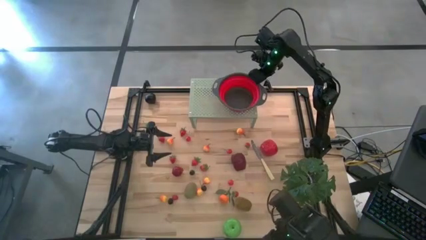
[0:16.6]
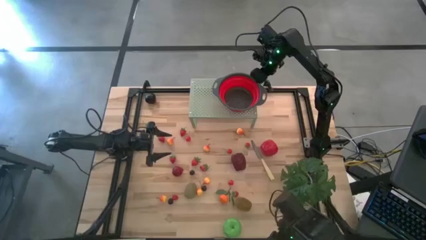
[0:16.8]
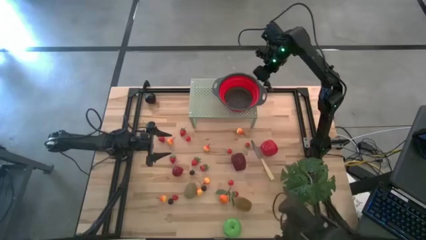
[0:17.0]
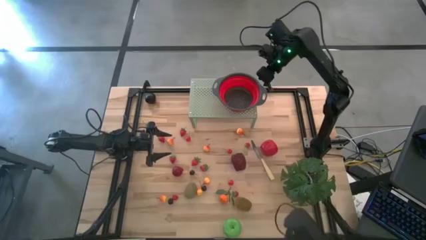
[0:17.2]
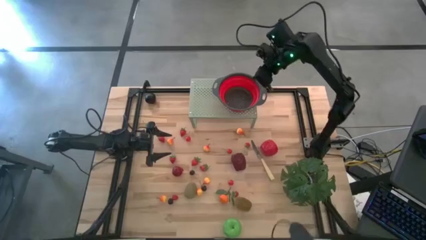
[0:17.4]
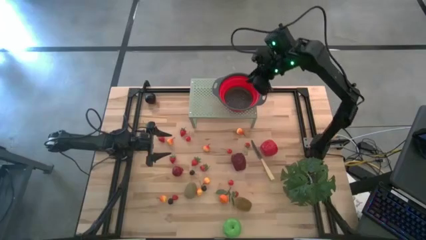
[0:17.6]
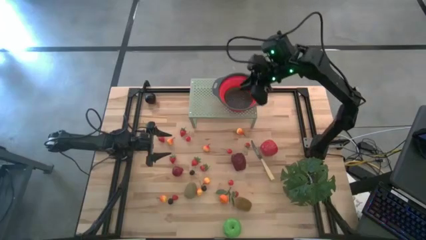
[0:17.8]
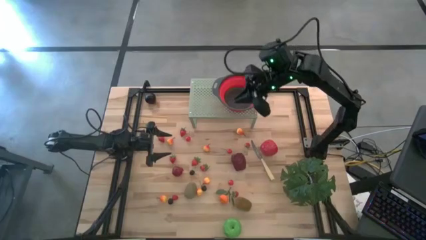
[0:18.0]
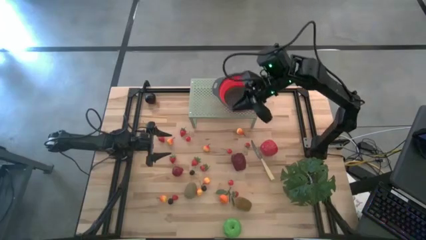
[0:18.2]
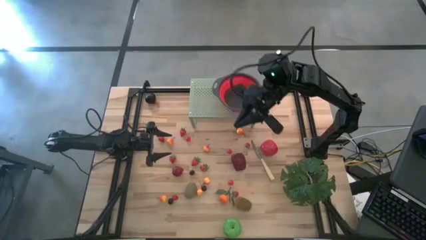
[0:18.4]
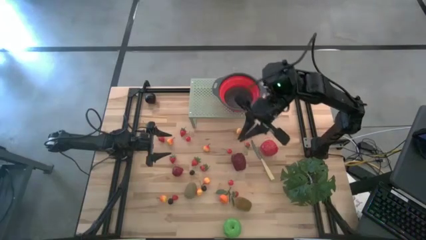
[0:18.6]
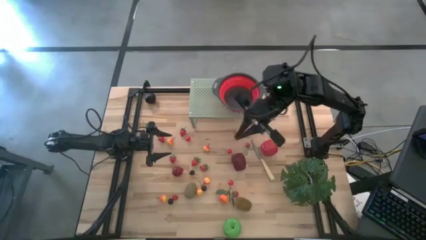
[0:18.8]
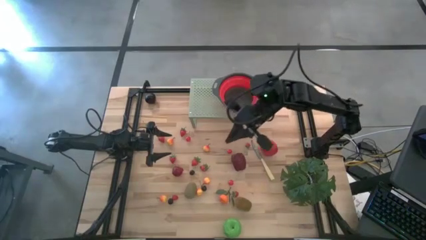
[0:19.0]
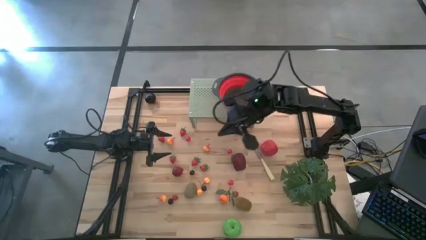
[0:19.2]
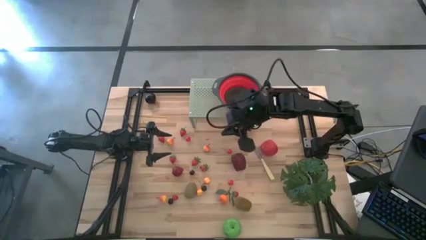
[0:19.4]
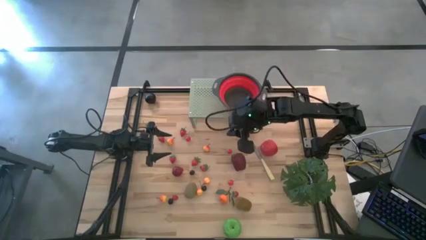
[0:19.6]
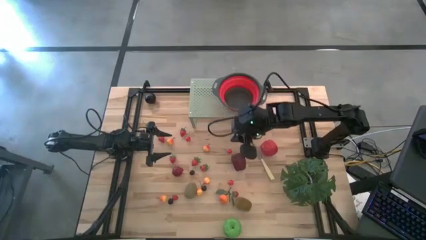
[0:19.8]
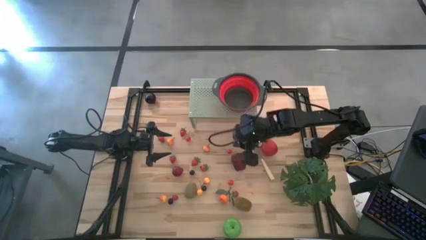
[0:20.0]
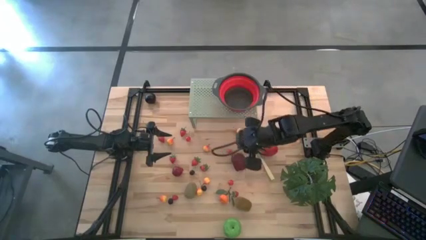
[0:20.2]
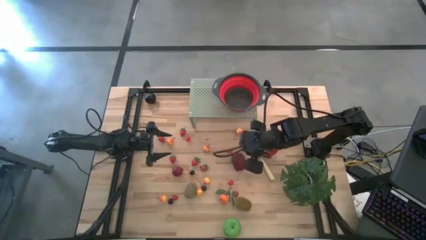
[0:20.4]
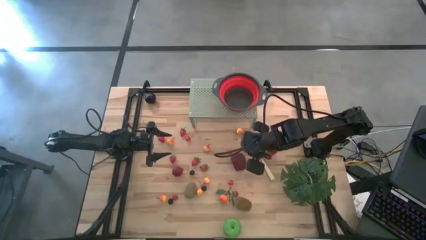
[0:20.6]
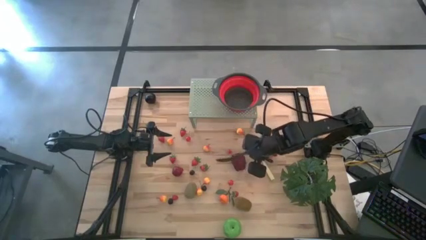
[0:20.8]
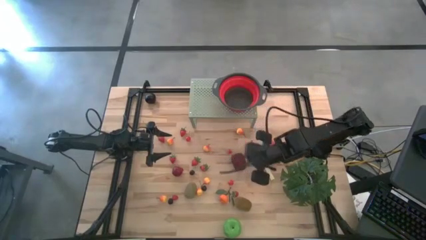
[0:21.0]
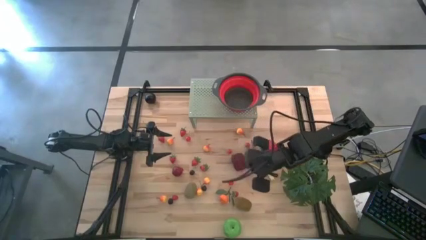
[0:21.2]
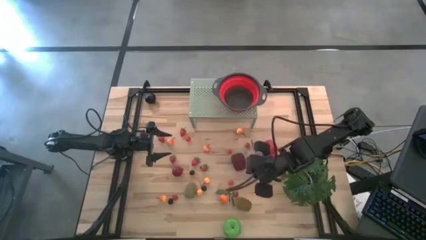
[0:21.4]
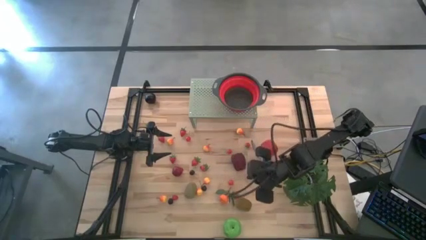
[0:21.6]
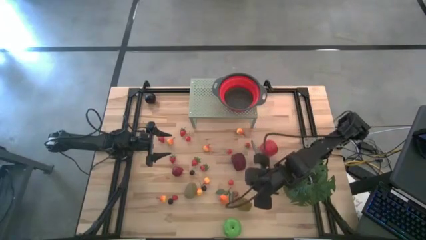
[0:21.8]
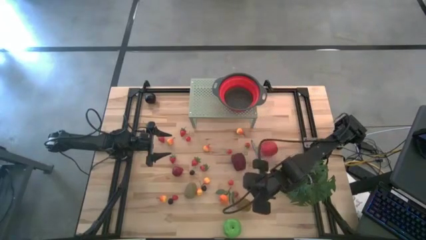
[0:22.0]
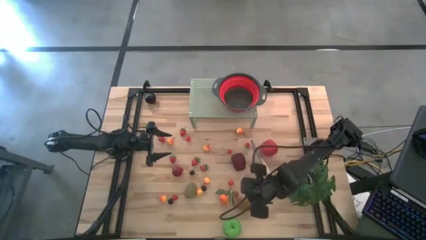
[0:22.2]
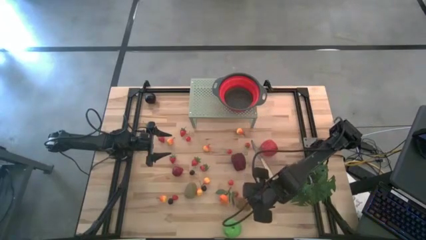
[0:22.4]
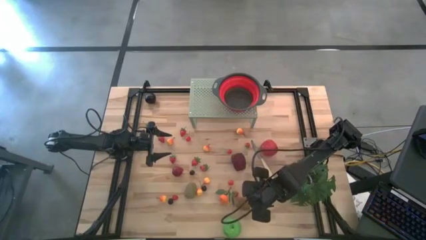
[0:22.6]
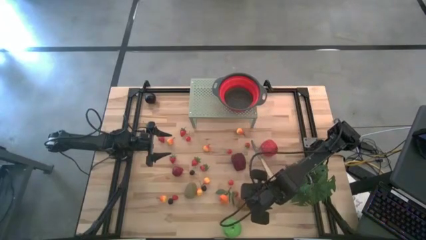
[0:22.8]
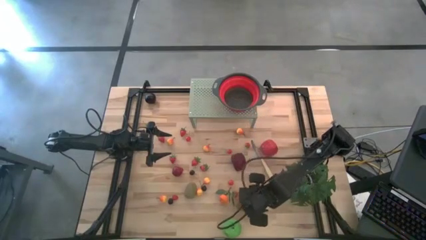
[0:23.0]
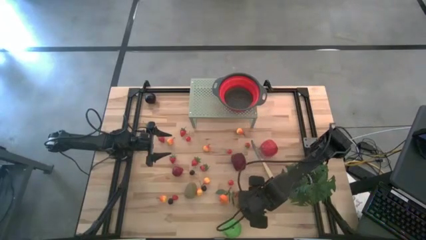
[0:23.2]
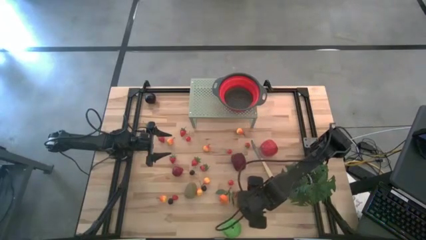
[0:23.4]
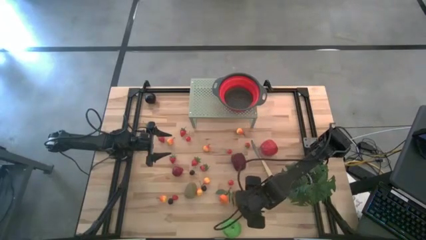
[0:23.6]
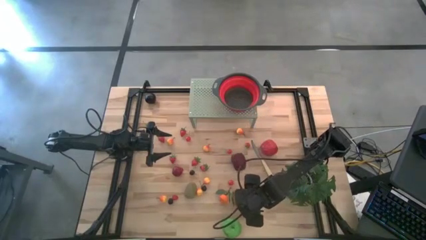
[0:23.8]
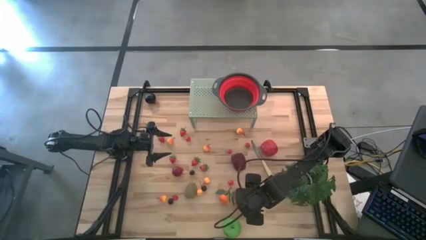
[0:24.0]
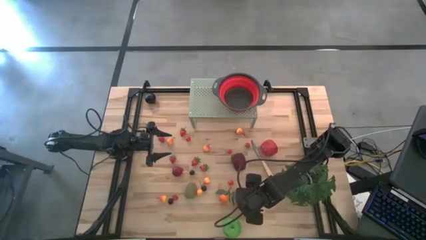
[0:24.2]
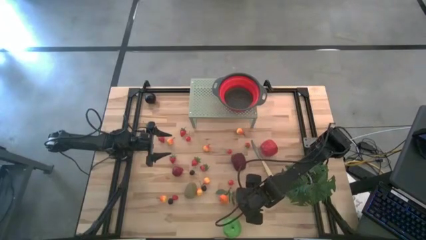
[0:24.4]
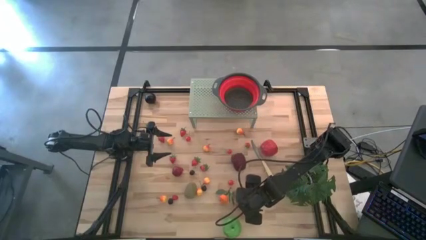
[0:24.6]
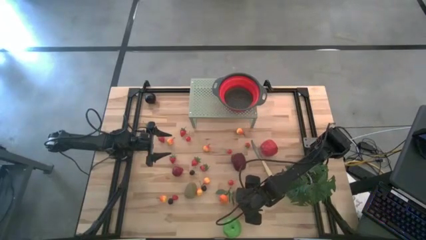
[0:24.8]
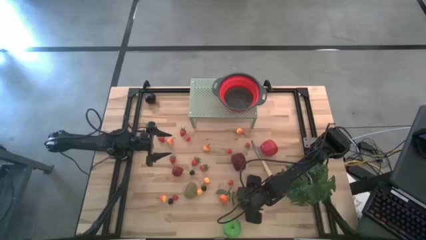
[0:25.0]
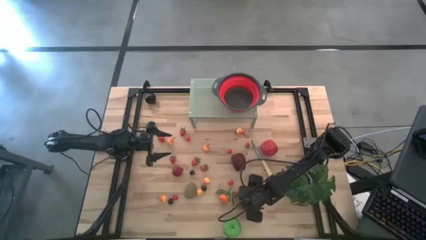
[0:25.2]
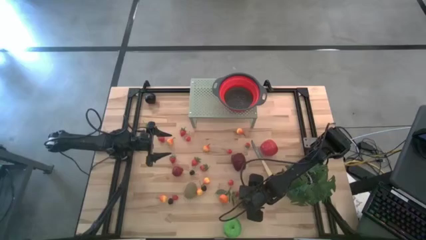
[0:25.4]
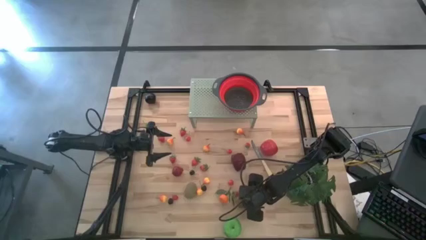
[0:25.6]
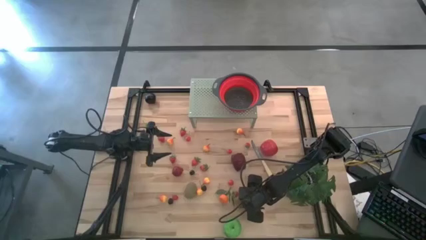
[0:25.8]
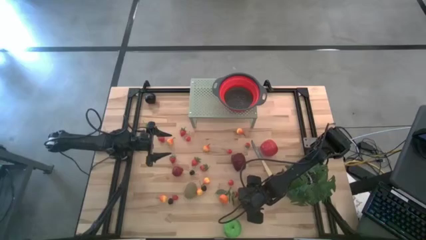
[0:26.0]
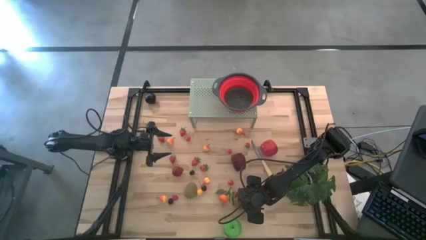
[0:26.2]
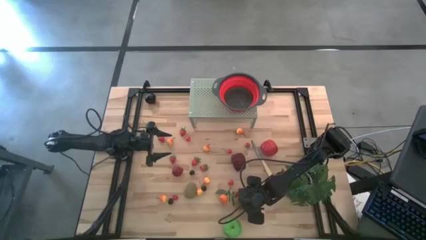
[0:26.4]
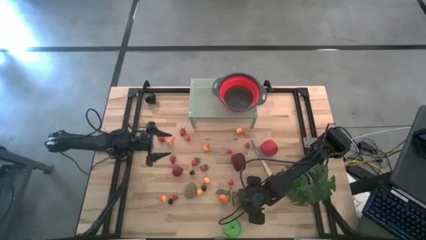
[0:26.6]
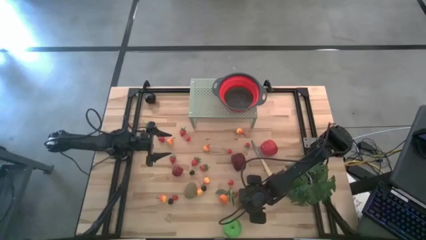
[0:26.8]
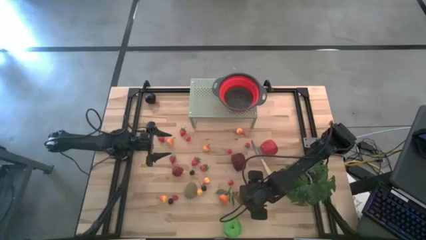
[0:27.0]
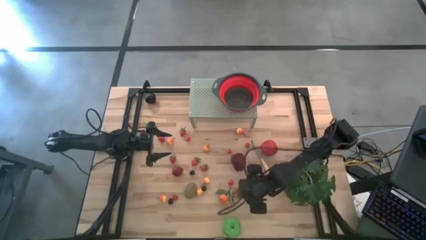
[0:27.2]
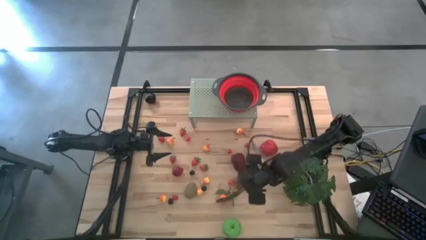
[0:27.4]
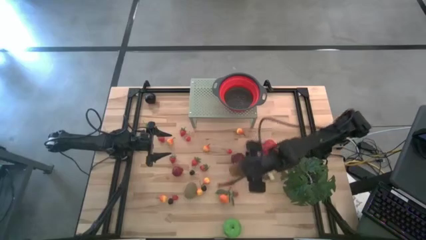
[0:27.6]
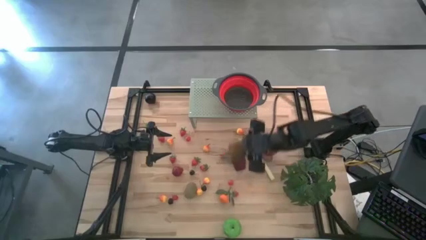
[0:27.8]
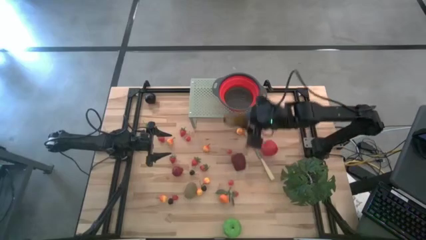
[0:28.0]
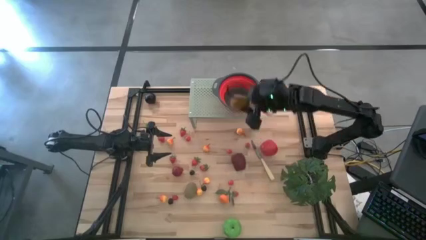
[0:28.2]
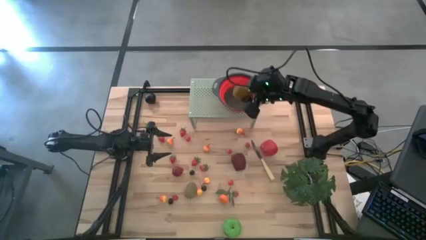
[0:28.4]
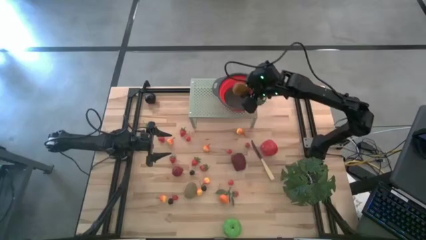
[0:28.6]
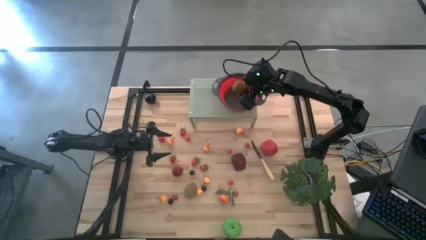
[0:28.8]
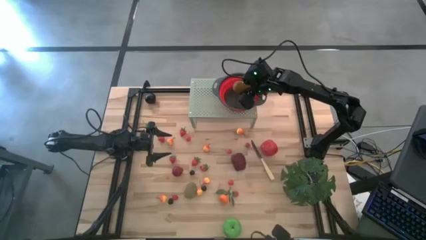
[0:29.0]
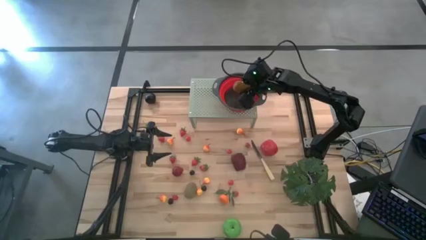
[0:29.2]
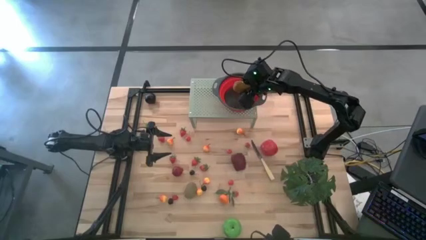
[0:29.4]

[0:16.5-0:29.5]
Task: Pick & Place Fruit
Put the brown kiwi into the black strainer bowl on the shelf
